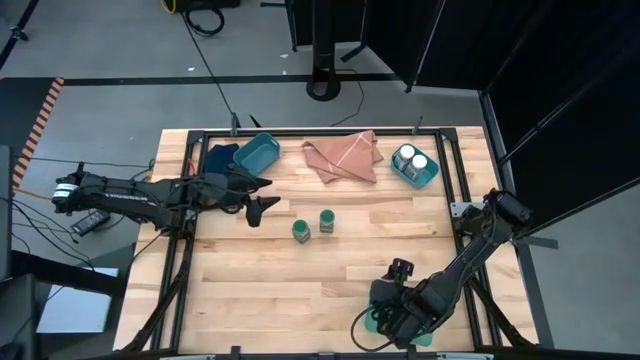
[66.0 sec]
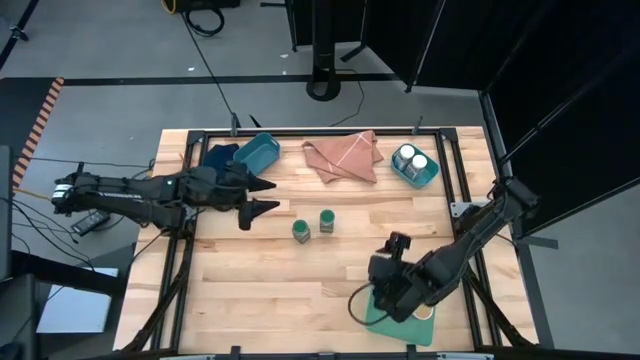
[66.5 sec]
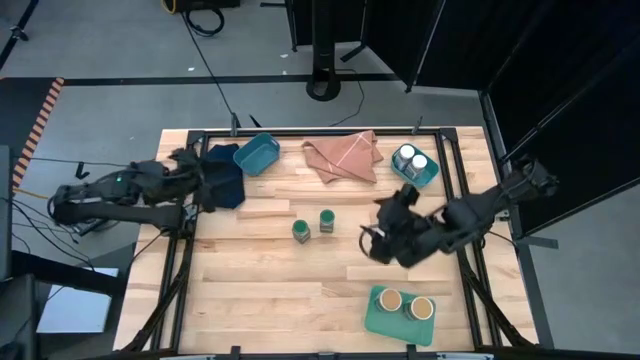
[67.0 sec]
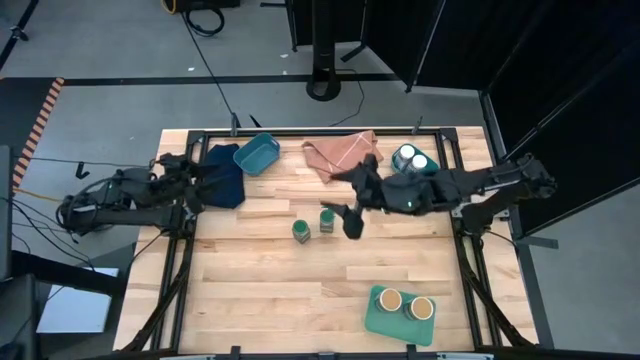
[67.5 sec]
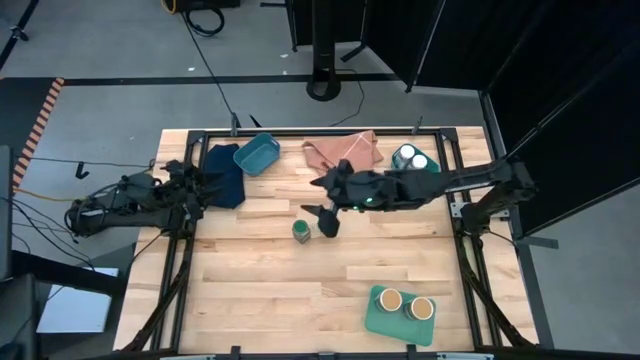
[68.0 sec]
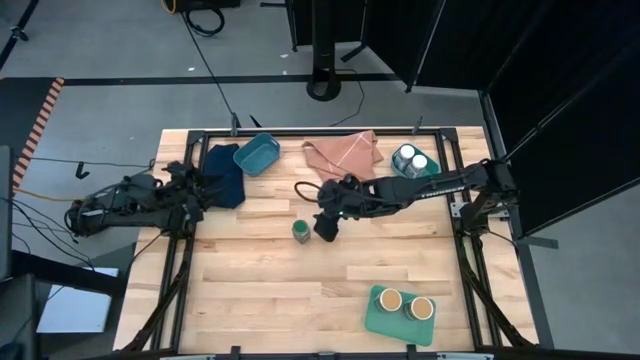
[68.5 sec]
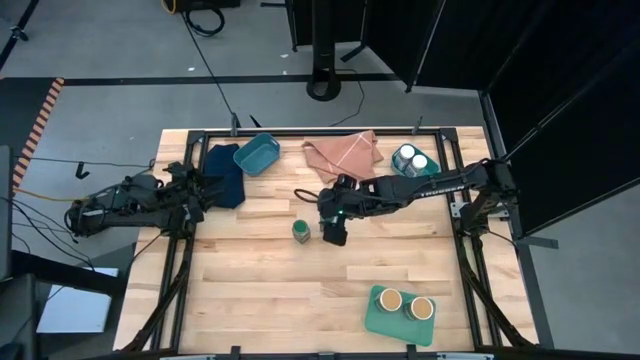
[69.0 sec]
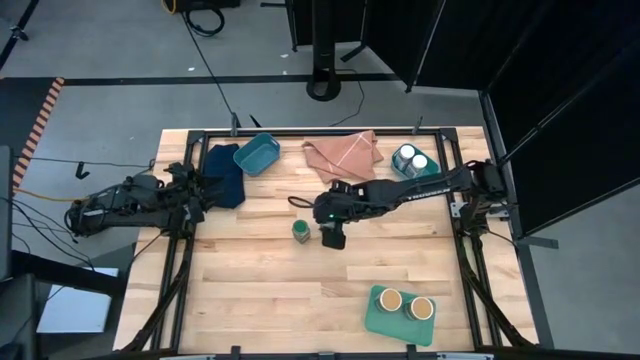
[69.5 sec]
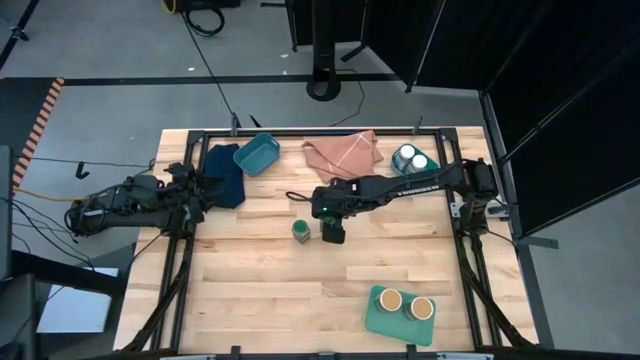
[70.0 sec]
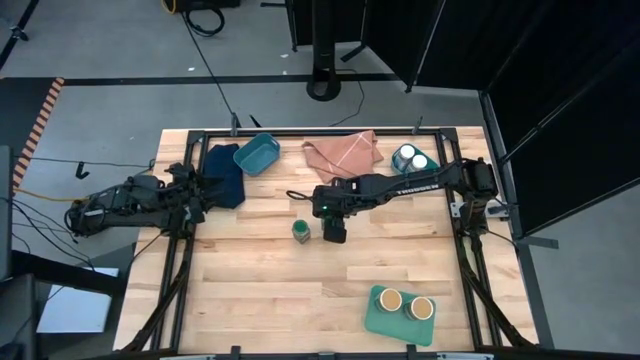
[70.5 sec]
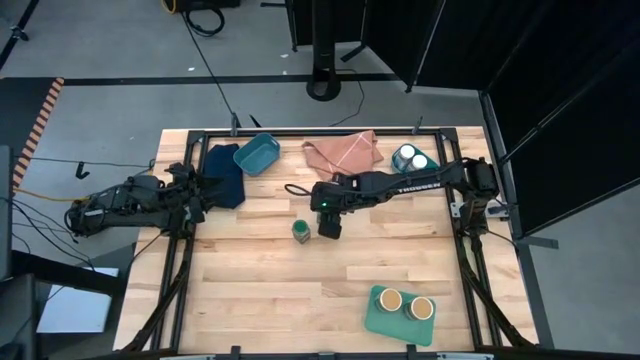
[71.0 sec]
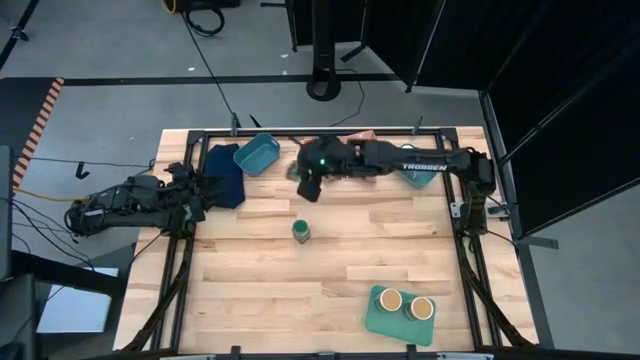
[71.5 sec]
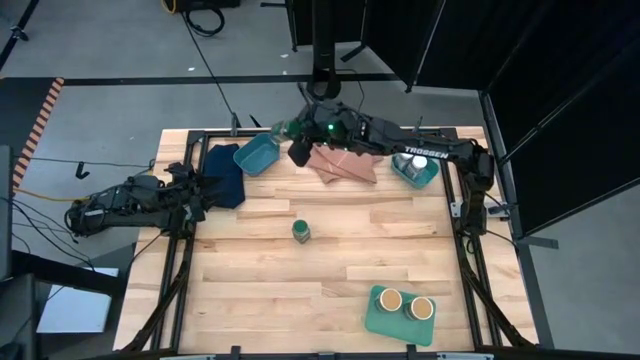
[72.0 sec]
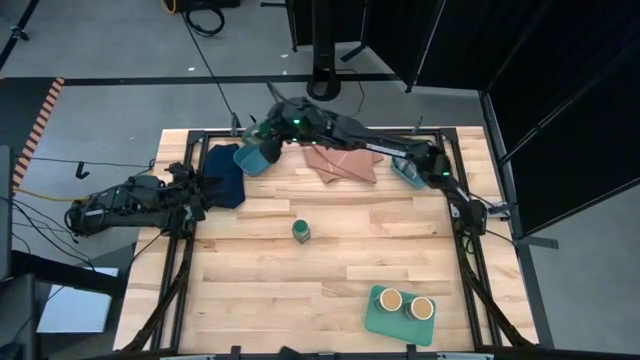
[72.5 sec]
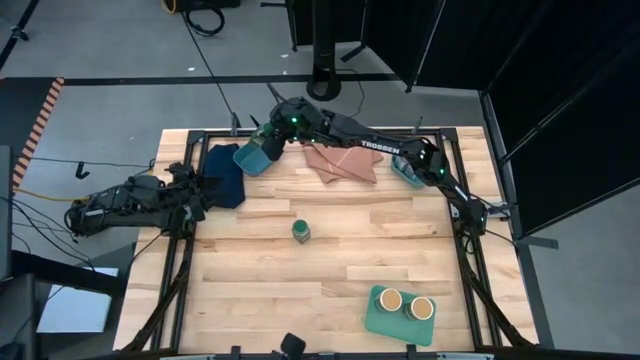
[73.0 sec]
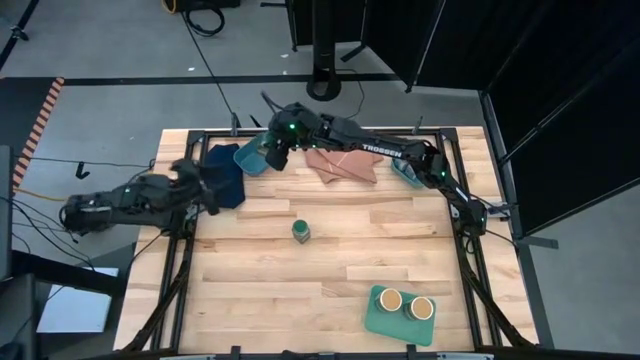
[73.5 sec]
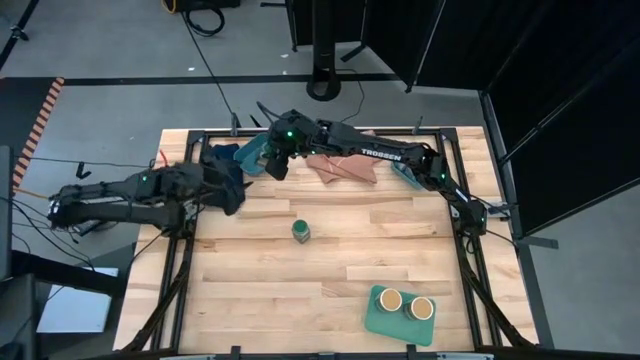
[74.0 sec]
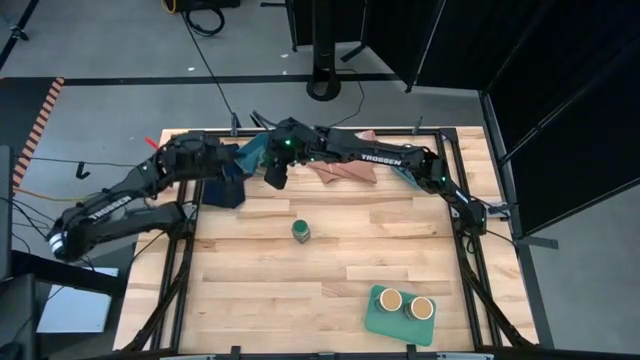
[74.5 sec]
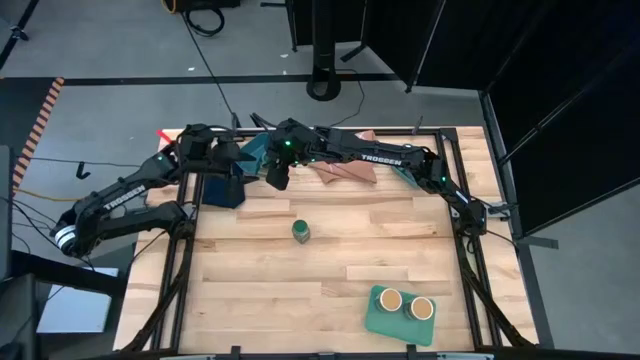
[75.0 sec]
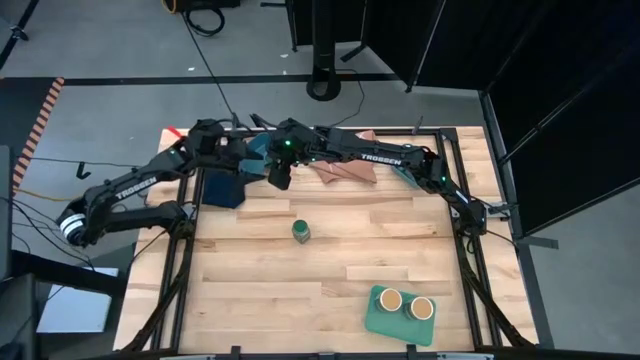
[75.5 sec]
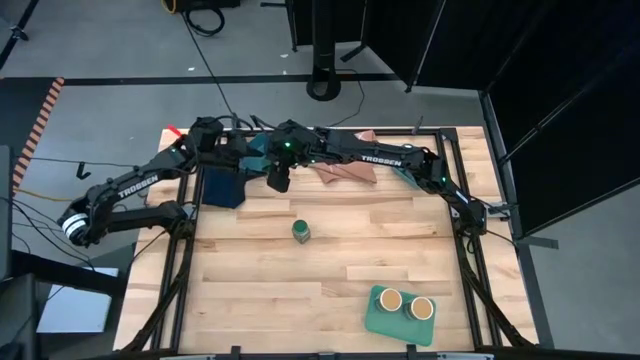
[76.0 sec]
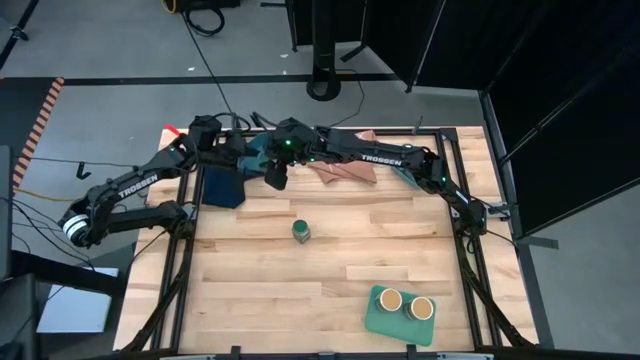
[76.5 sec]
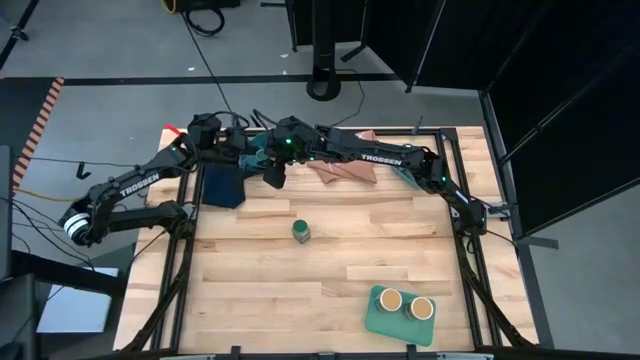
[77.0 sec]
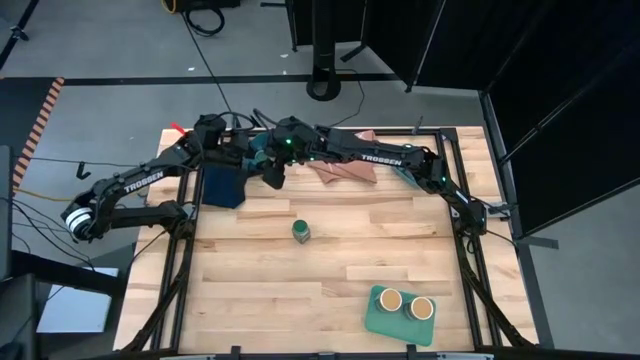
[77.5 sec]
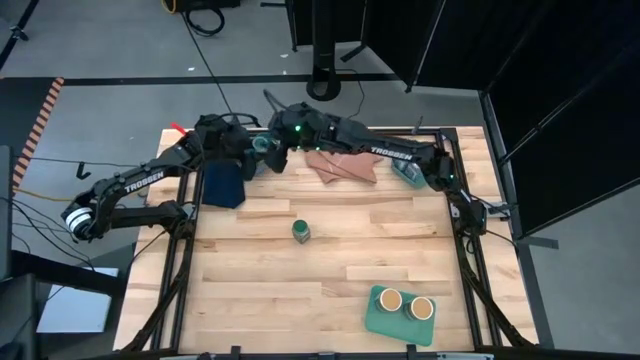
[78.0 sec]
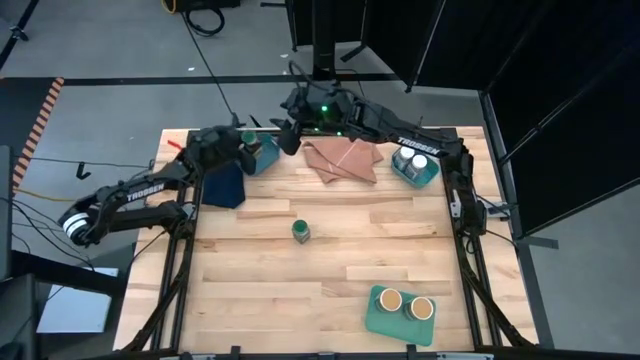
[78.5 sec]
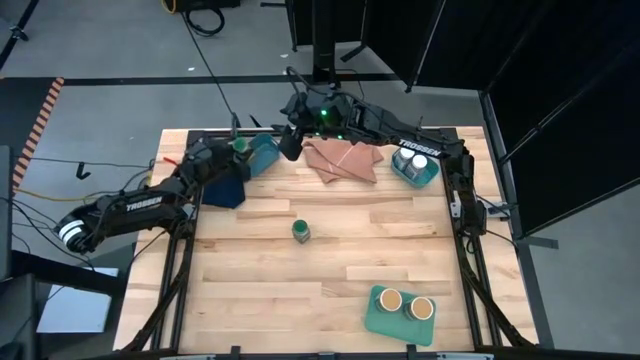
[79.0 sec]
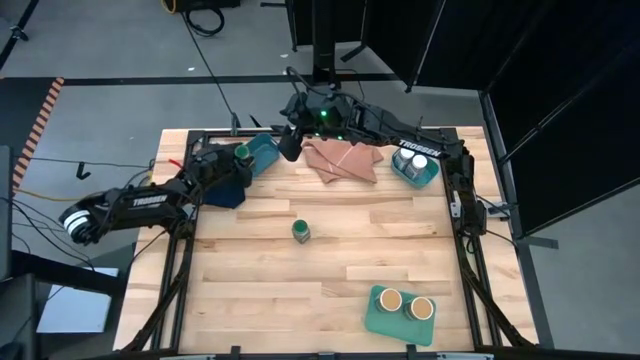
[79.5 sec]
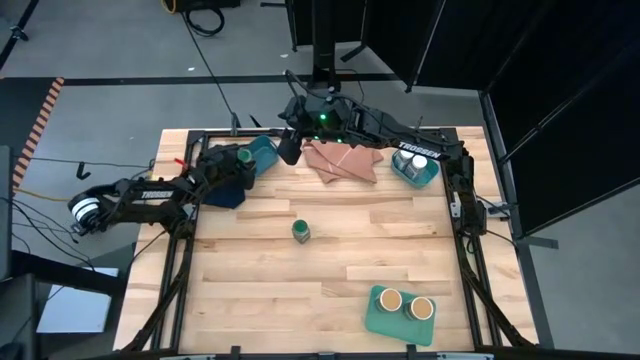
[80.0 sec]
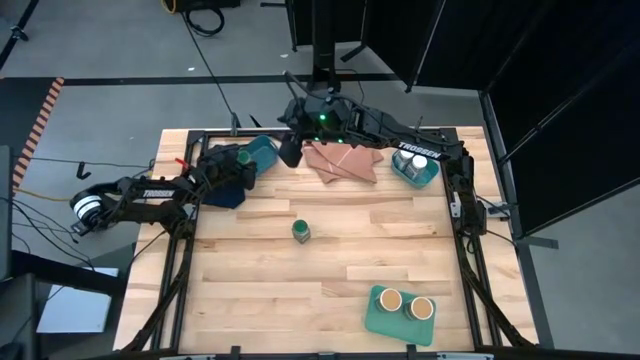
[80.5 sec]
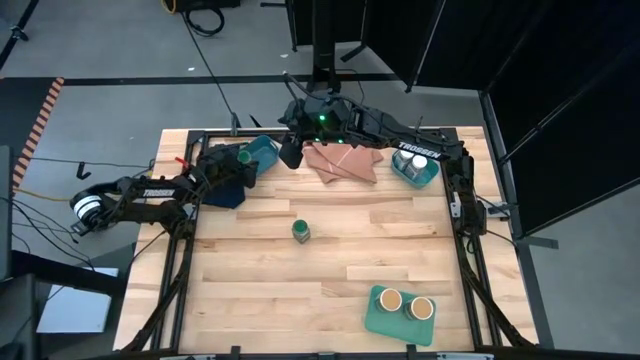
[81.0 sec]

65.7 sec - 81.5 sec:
Task: Sort spices by type
Put the right green seasoning bottle into the blue bin

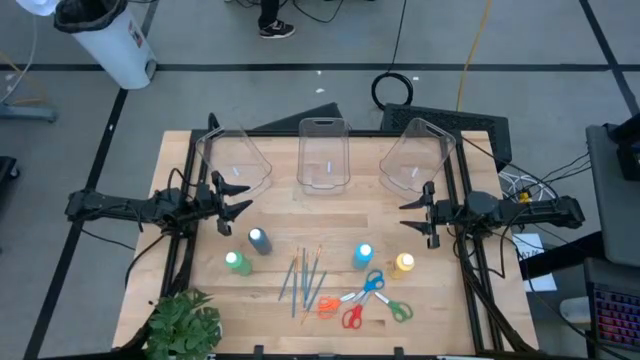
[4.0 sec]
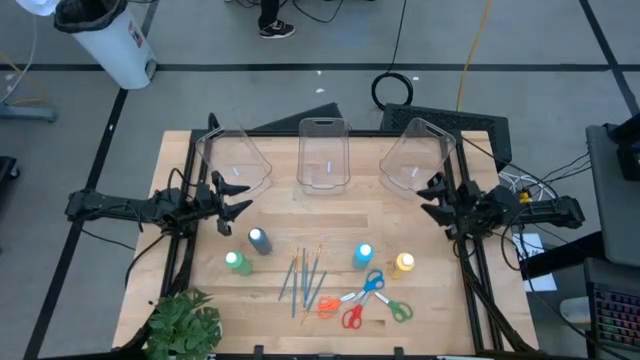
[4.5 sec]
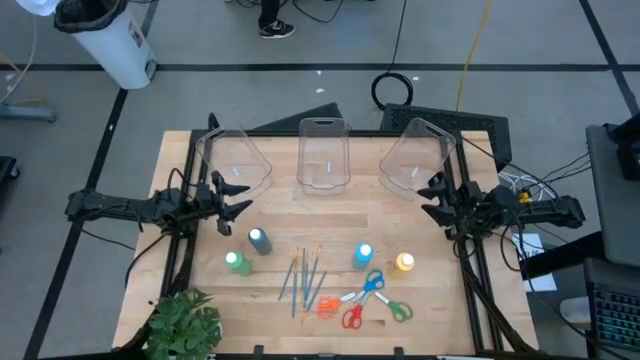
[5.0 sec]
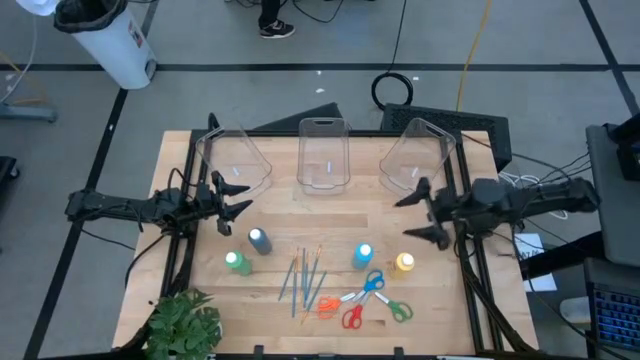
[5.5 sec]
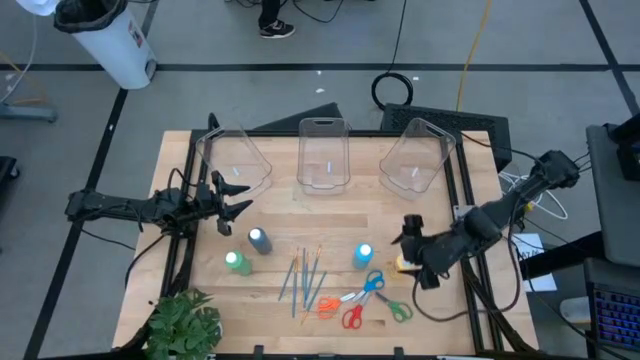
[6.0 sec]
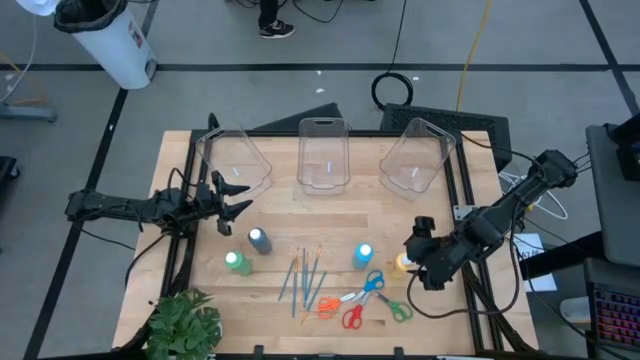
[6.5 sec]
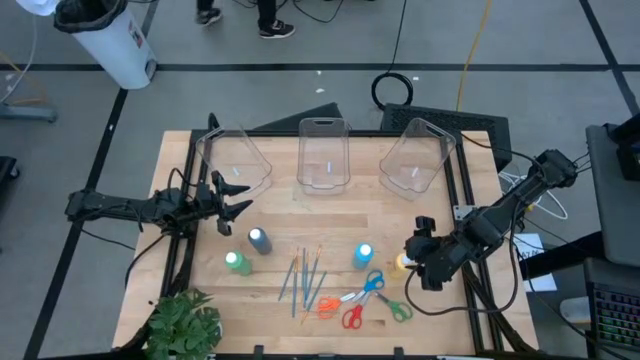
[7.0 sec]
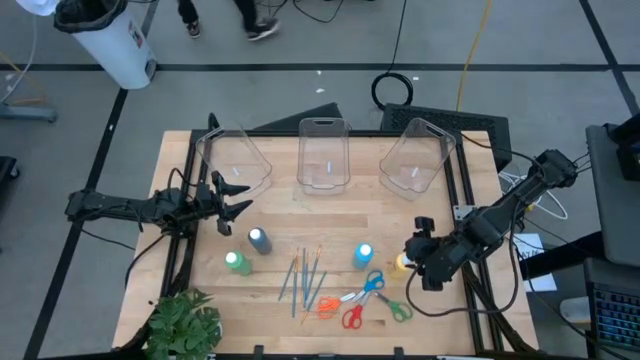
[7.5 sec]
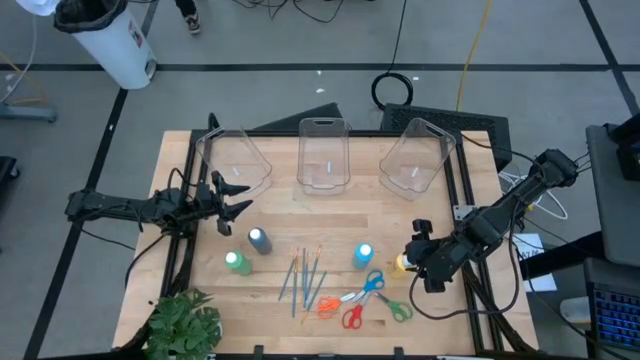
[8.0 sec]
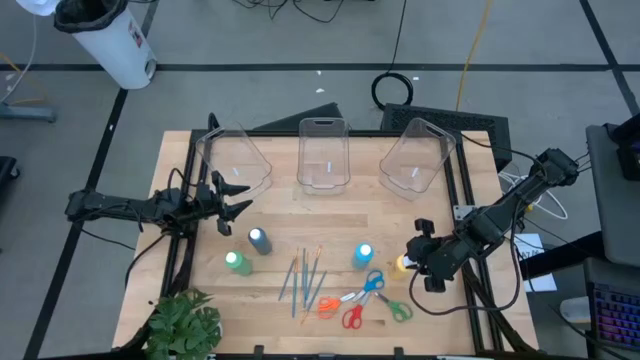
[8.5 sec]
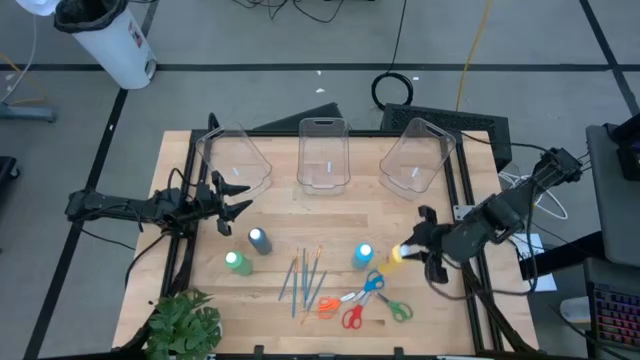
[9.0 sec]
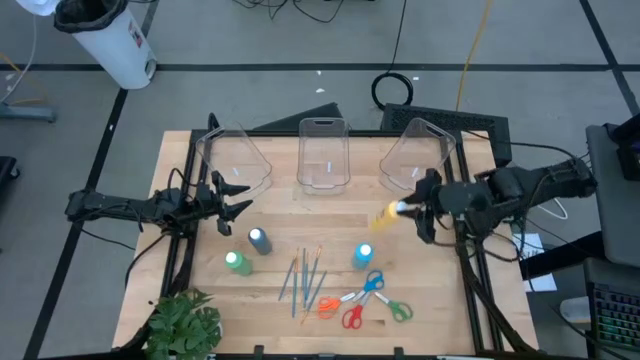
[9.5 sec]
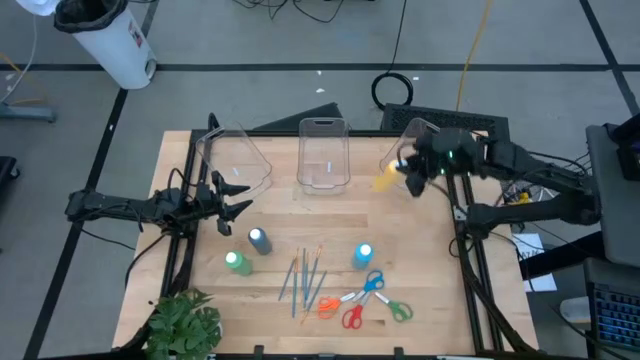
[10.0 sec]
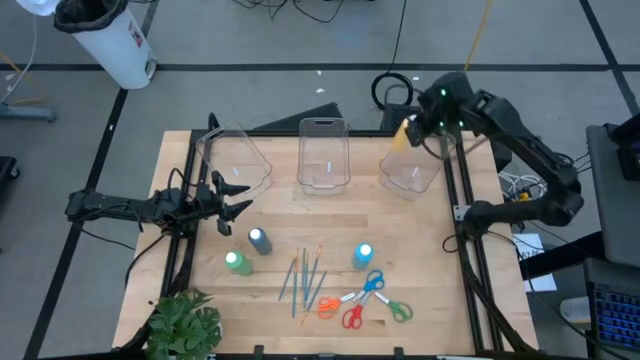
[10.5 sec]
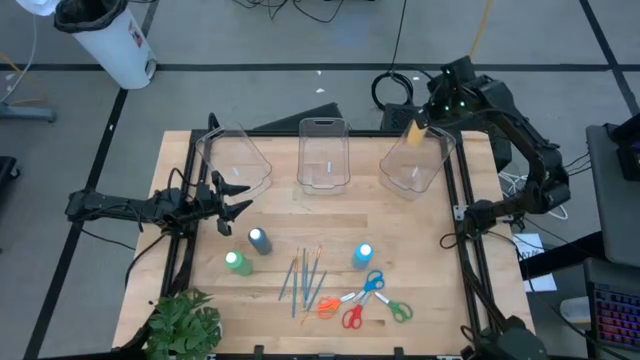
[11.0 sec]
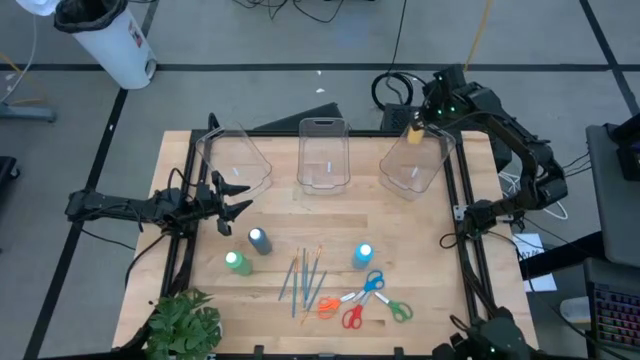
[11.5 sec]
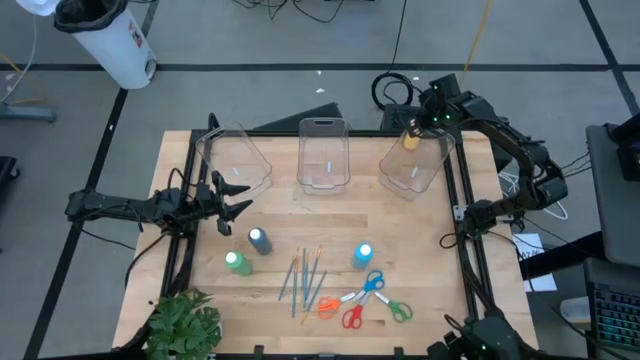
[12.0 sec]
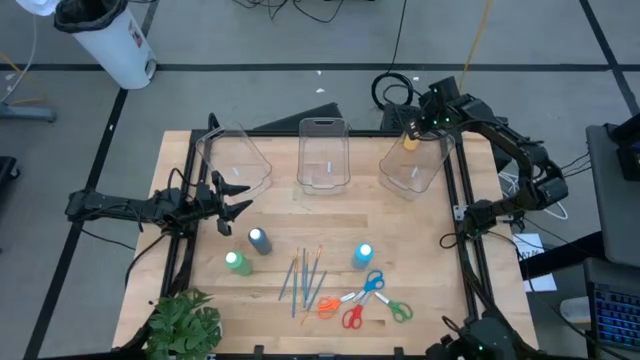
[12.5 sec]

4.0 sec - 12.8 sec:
Task: Pick & Place Paint Supplies
Put the yellow paint bottle into the right transparent bin
